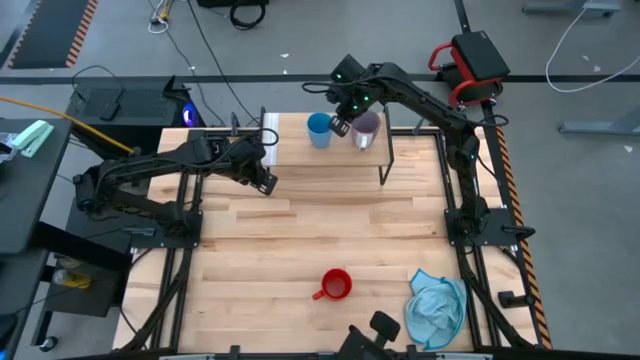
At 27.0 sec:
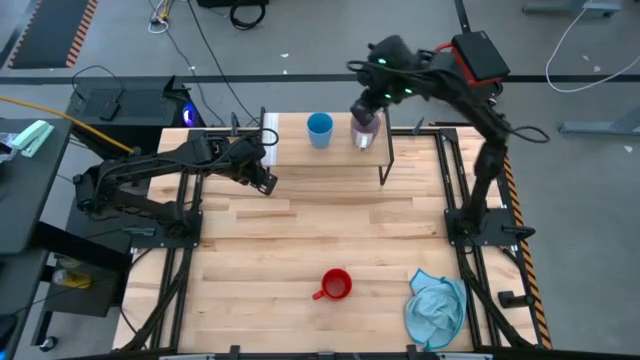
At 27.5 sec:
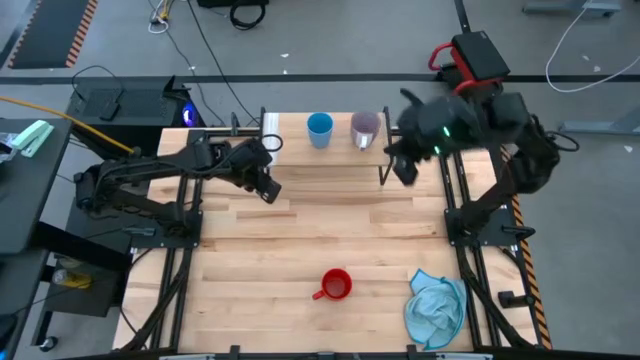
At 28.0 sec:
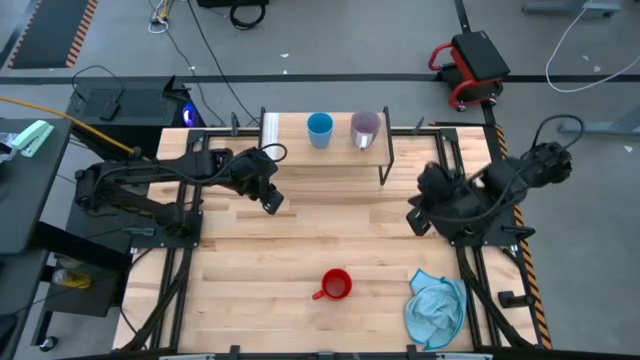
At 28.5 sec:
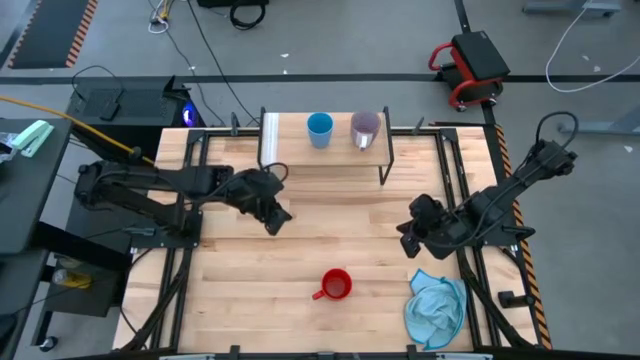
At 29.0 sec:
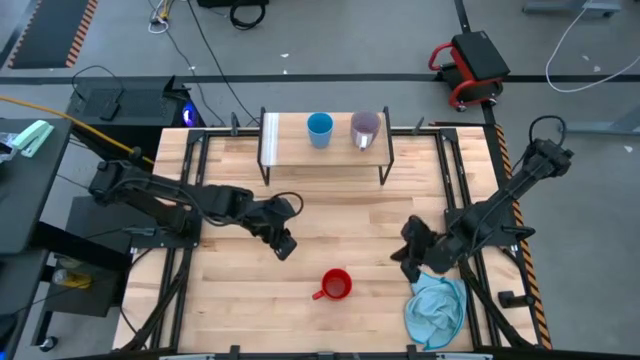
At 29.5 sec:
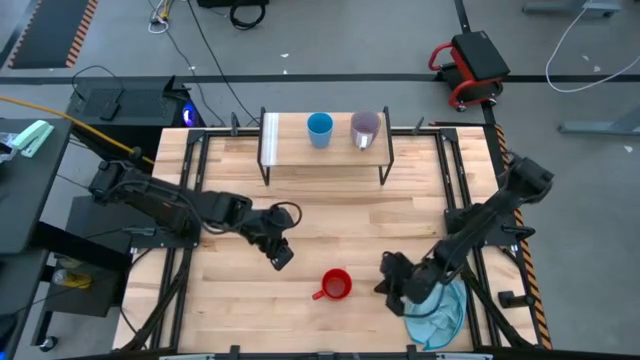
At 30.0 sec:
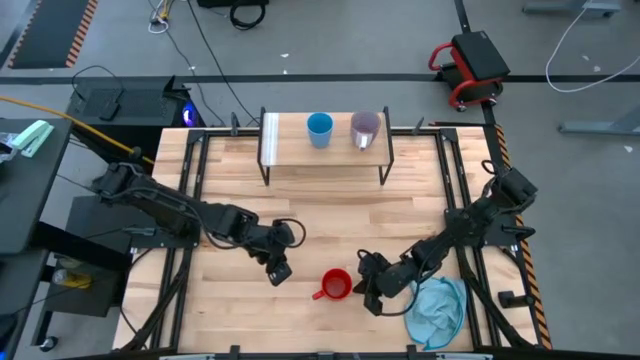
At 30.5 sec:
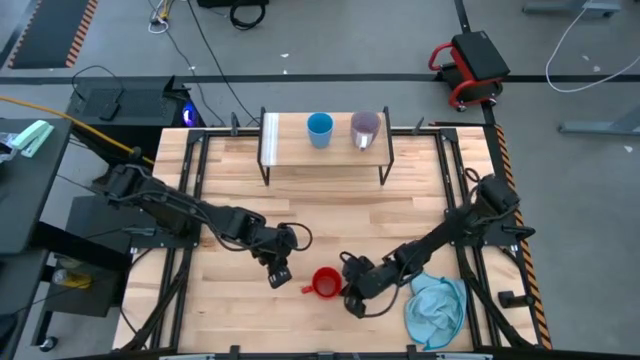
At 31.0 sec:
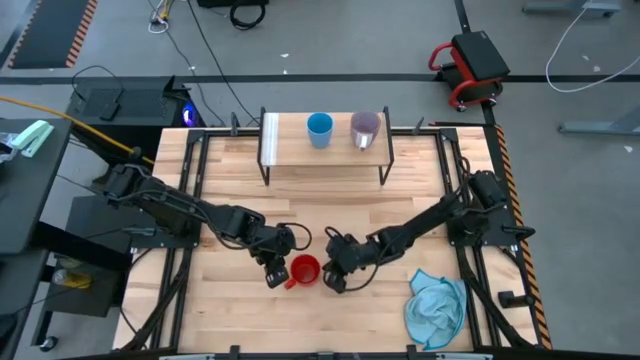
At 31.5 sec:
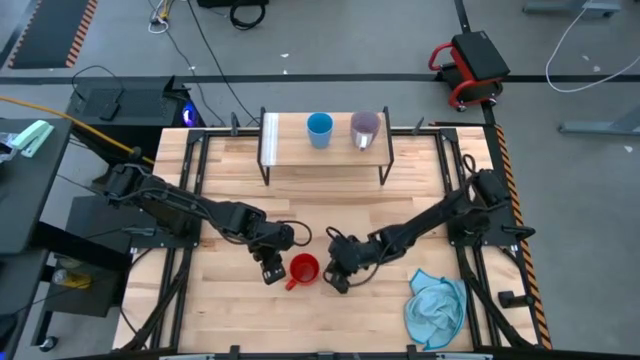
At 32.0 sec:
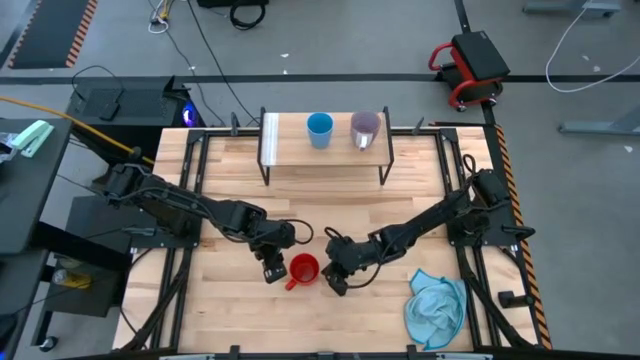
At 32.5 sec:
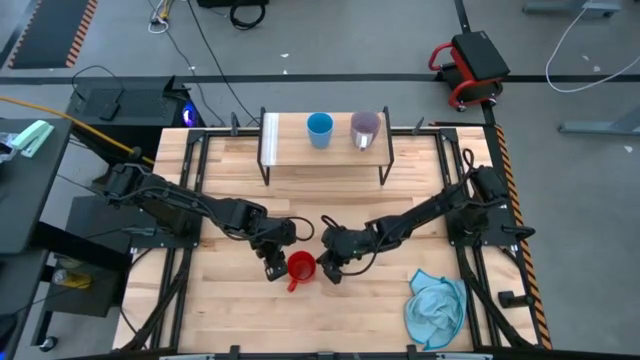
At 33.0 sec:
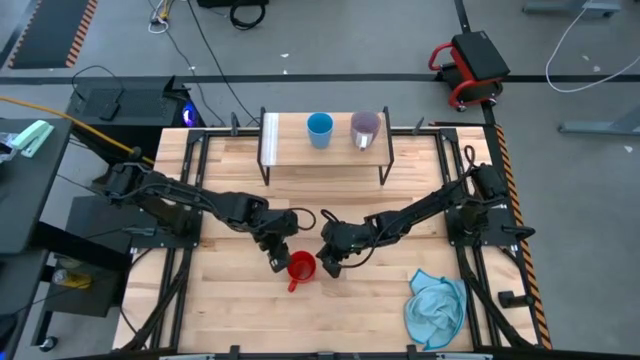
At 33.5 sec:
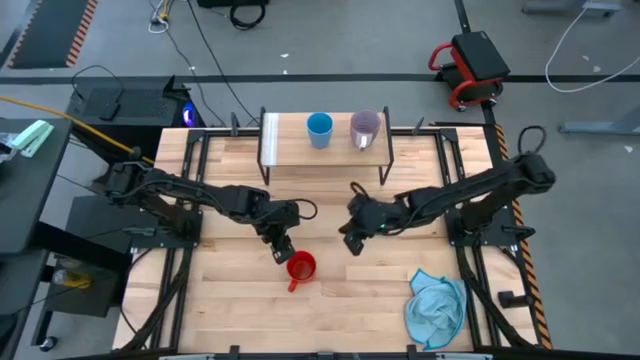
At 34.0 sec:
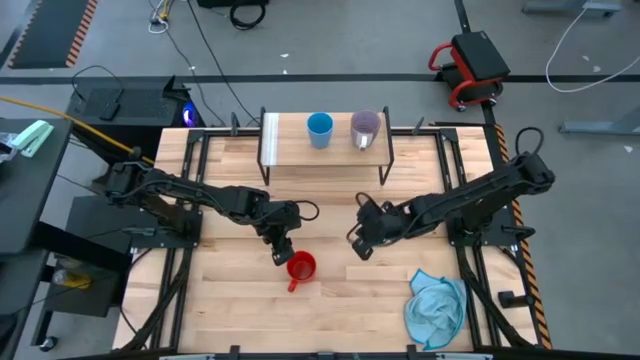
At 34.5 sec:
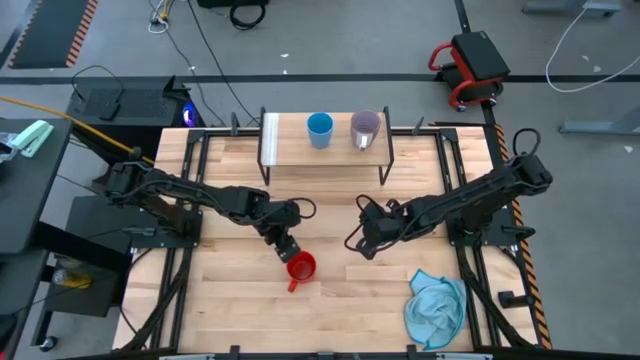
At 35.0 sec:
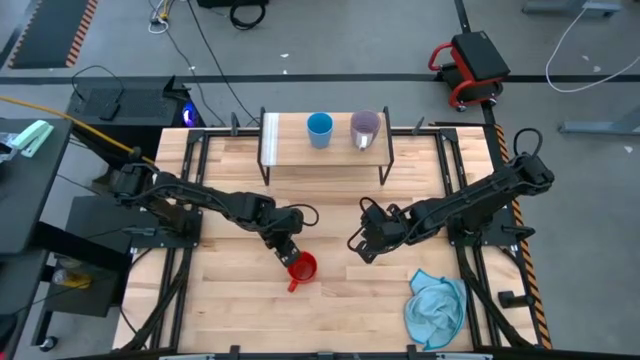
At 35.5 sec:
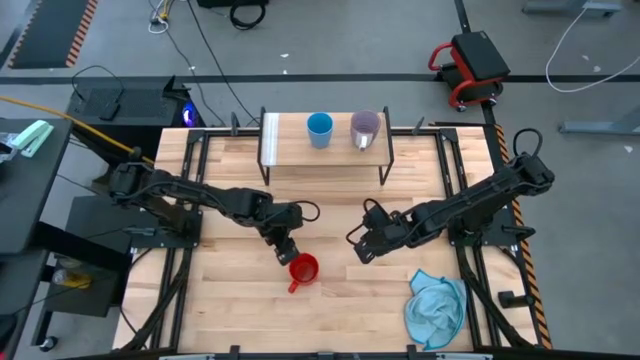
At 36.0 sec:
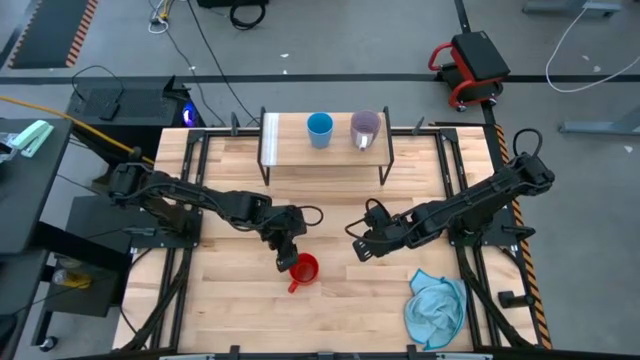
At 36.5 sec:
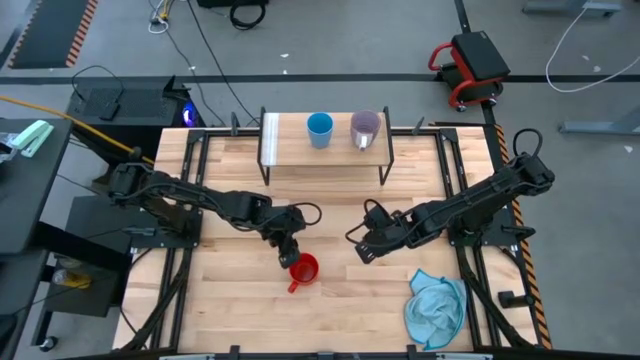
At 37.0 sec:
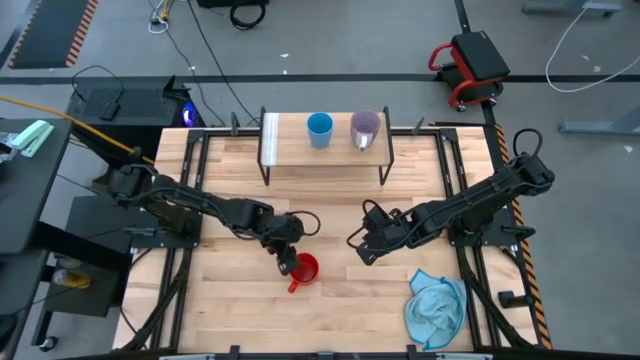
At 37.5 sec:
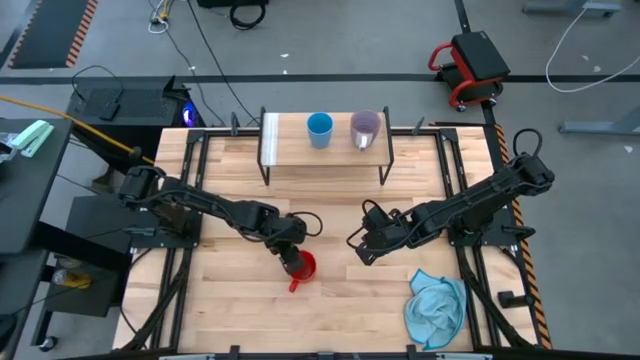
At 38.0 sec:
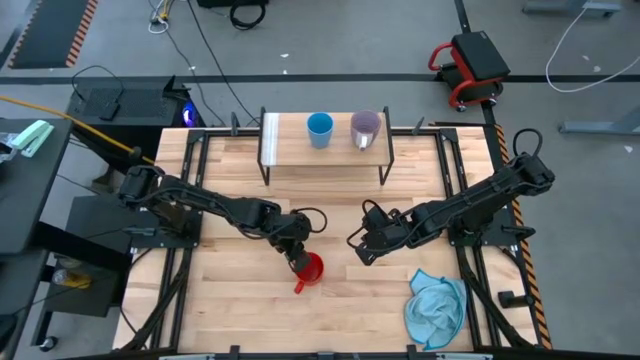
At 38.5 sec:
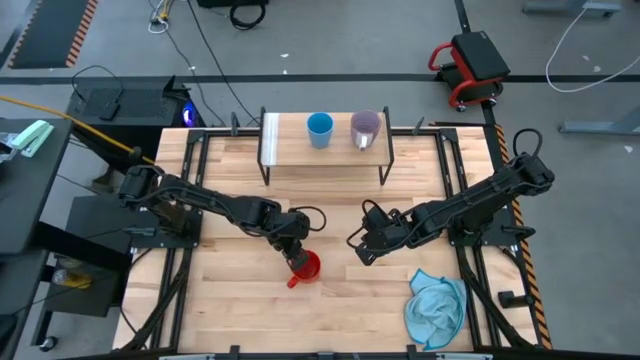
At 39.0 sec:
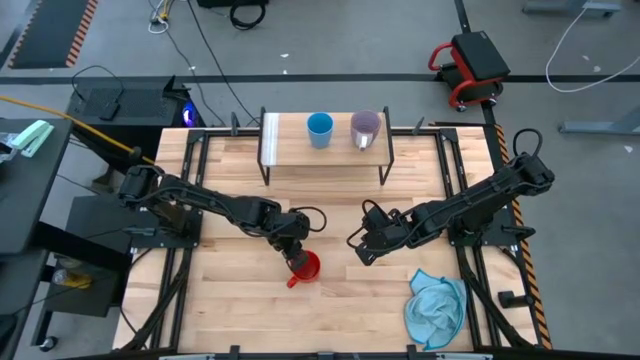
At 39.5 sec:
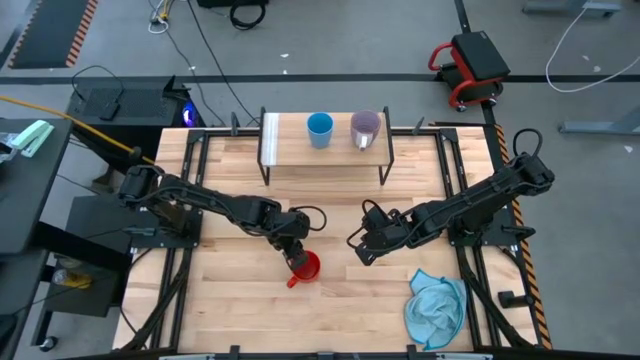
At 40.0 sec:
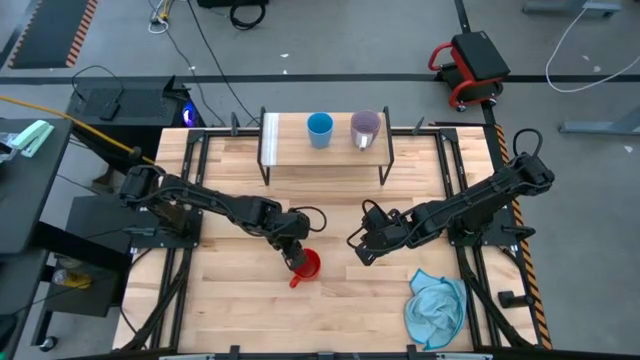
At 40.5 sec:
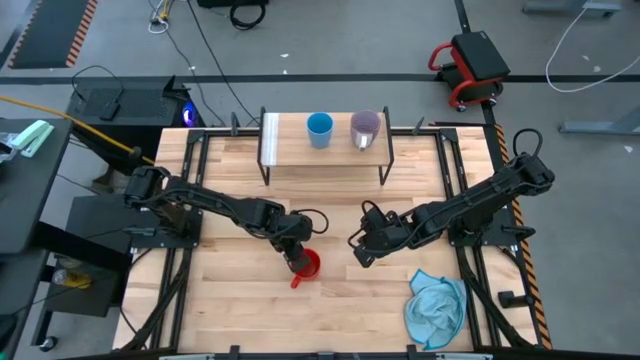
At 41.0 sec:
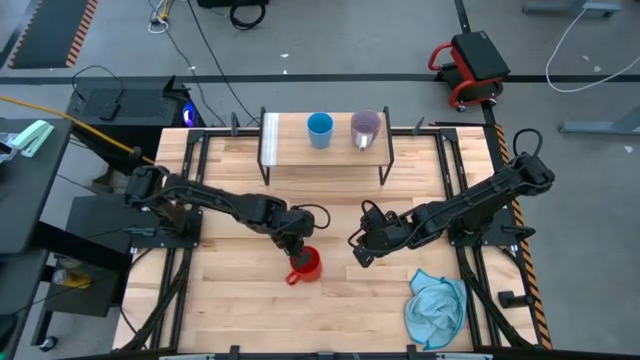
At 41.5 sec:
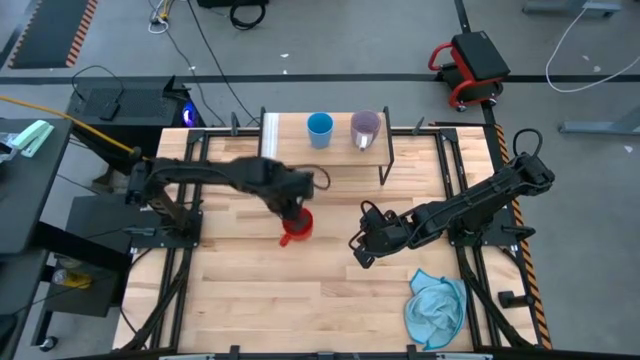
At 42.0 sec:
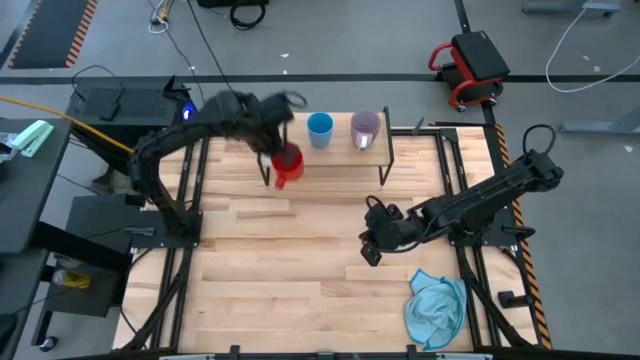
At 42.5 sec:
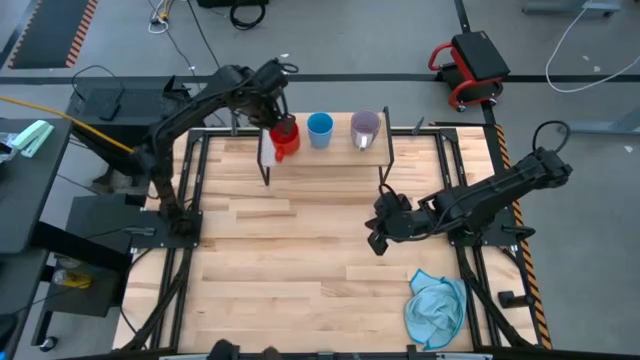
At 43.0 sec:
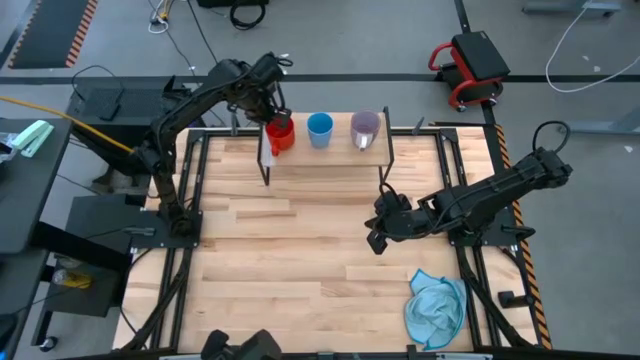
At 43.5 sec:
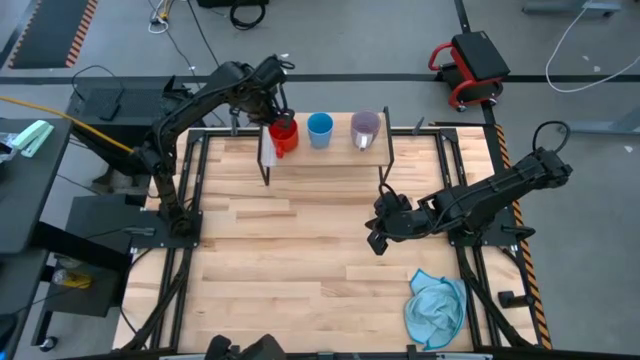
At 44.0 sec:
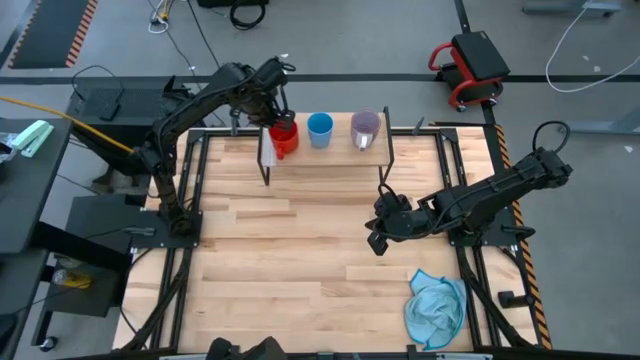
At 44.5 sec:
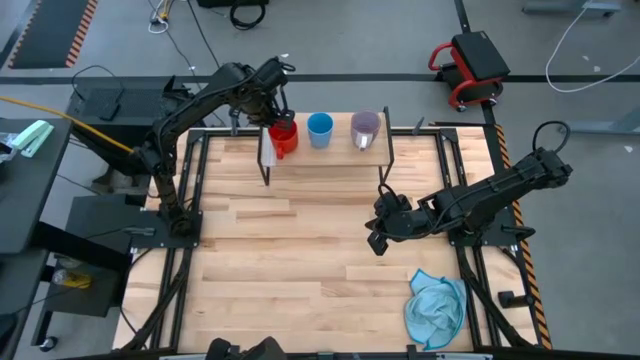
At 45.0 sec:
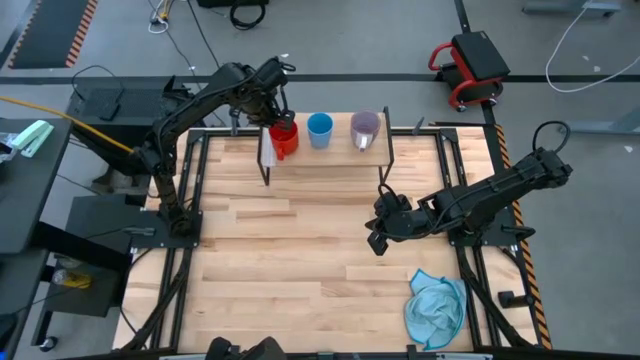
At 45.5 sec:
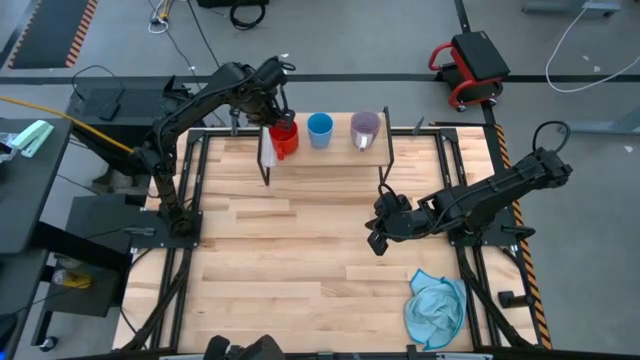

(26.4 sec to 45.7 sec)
Task: Stack small to large cups/mugs on shelf
Put the red cup on the shelf
